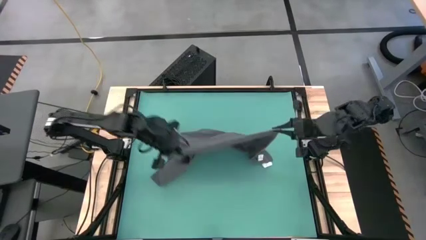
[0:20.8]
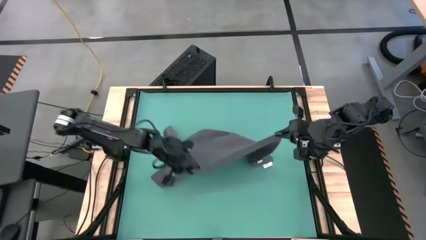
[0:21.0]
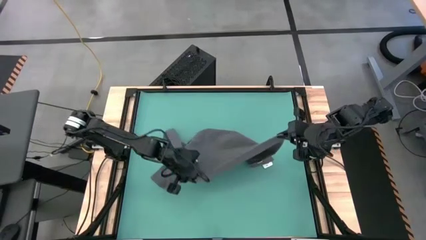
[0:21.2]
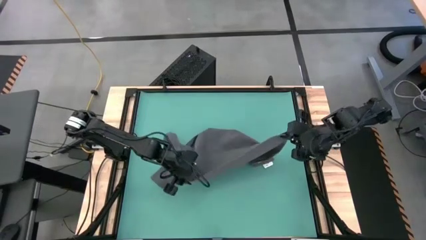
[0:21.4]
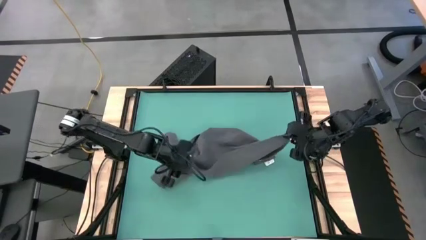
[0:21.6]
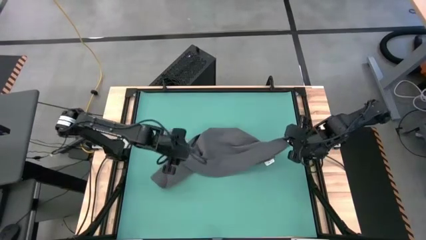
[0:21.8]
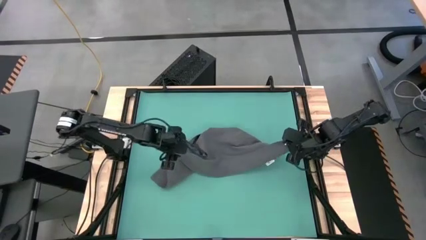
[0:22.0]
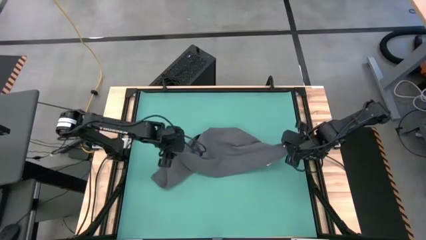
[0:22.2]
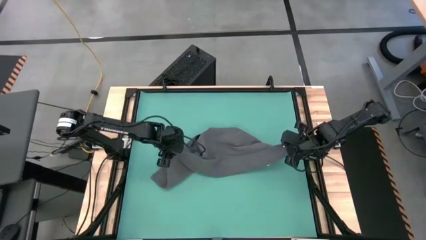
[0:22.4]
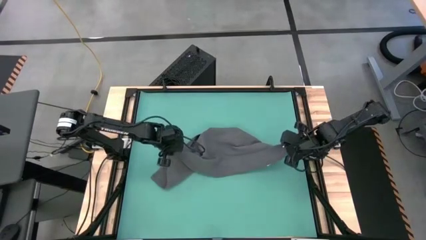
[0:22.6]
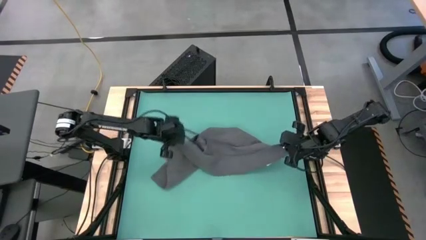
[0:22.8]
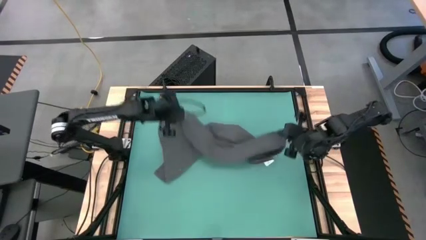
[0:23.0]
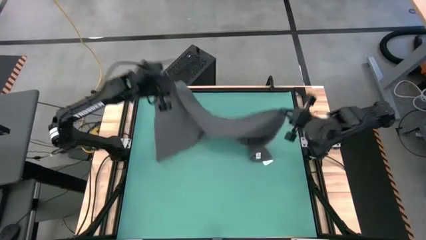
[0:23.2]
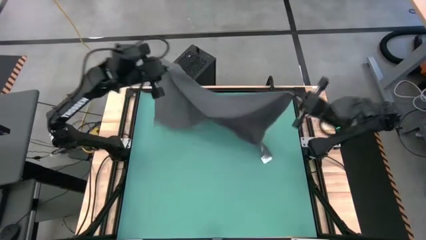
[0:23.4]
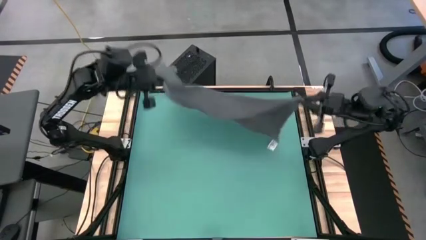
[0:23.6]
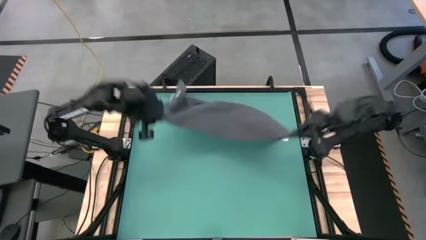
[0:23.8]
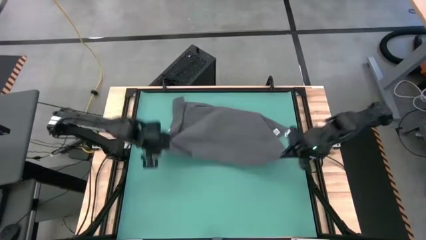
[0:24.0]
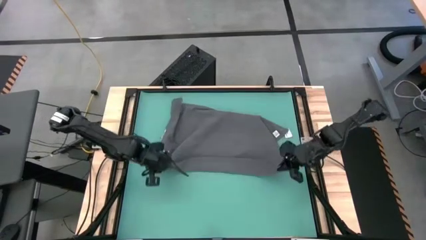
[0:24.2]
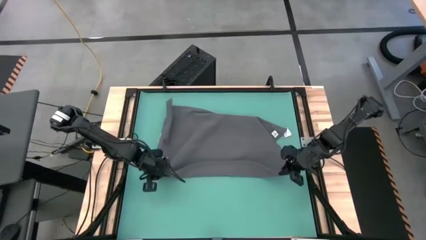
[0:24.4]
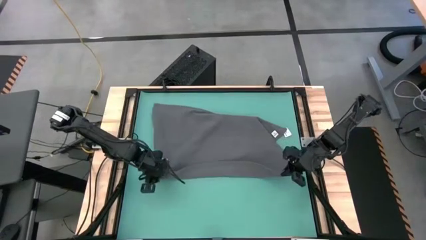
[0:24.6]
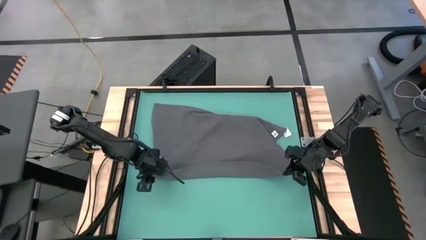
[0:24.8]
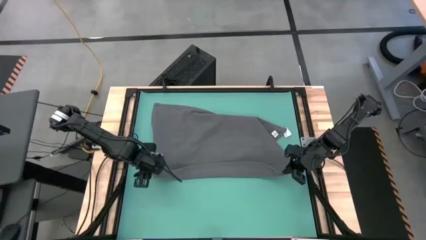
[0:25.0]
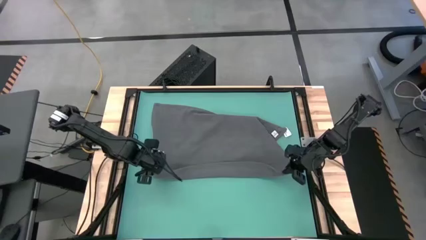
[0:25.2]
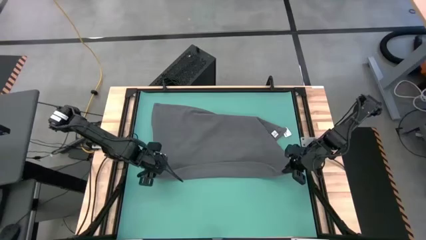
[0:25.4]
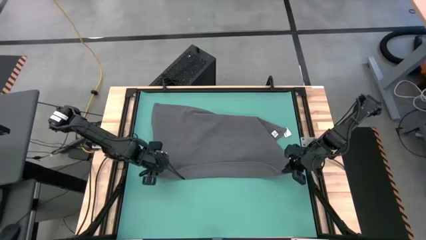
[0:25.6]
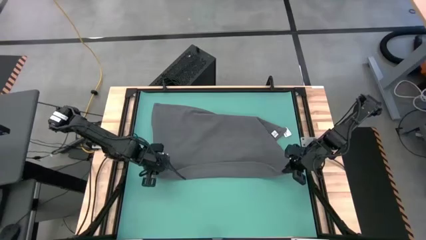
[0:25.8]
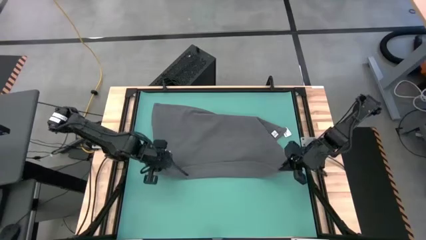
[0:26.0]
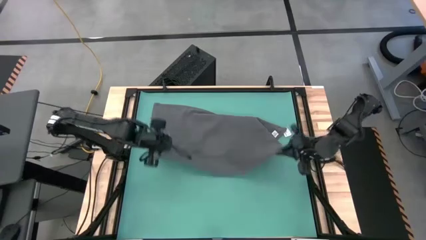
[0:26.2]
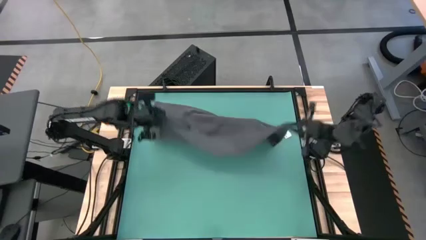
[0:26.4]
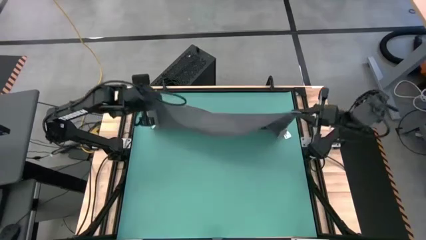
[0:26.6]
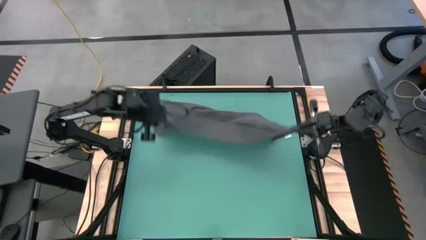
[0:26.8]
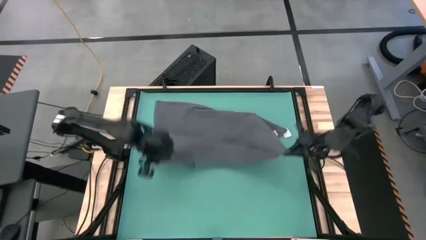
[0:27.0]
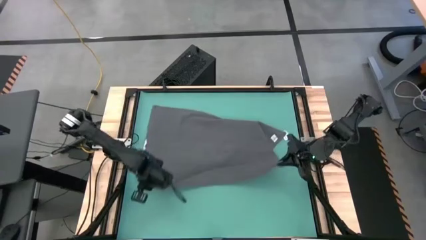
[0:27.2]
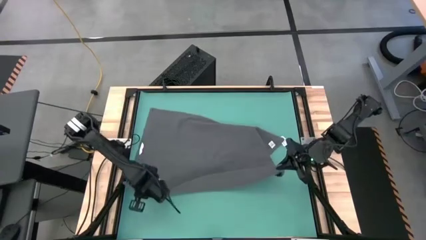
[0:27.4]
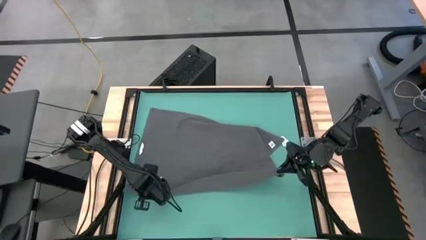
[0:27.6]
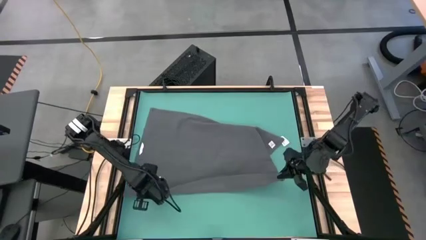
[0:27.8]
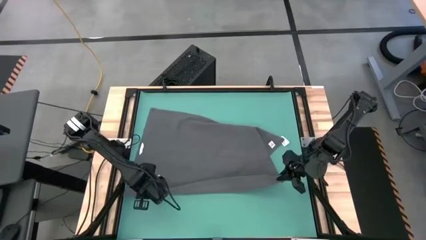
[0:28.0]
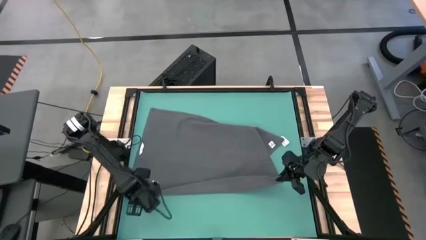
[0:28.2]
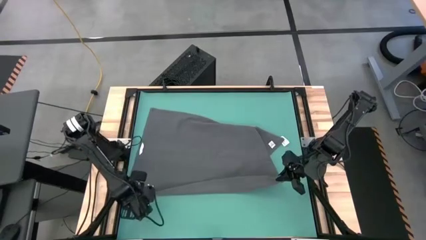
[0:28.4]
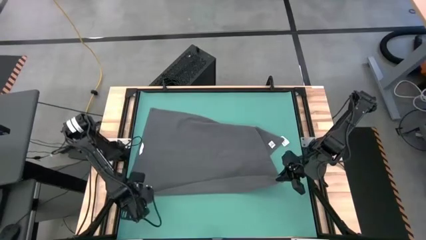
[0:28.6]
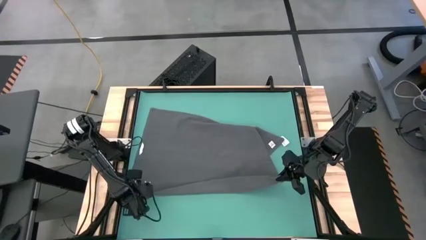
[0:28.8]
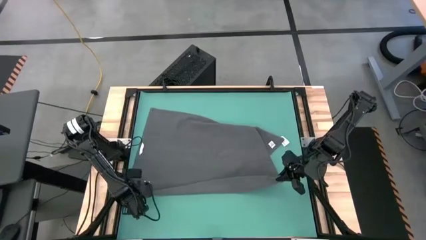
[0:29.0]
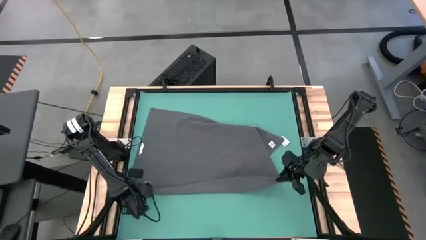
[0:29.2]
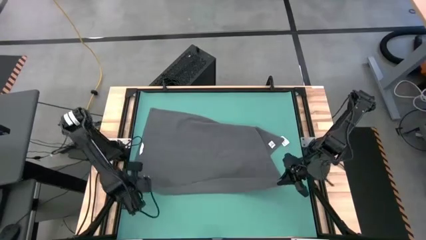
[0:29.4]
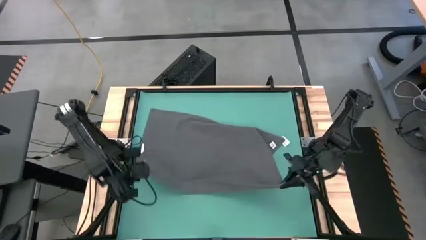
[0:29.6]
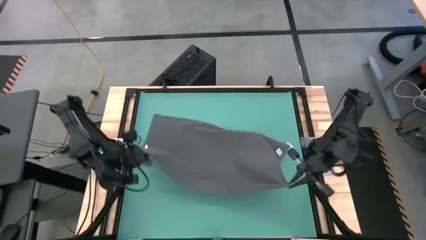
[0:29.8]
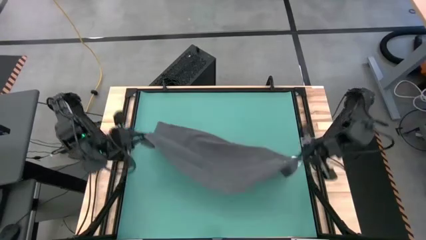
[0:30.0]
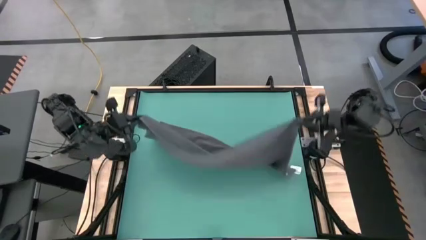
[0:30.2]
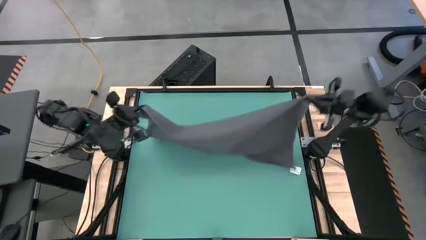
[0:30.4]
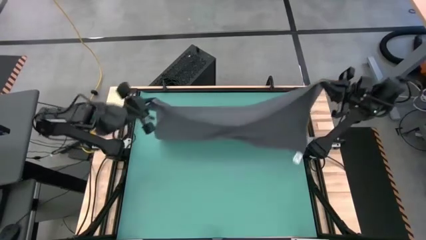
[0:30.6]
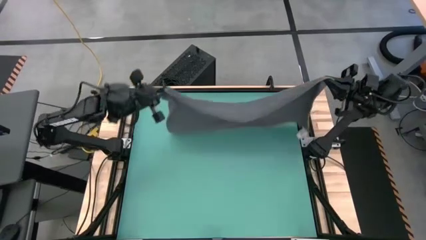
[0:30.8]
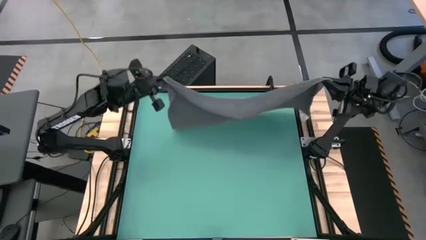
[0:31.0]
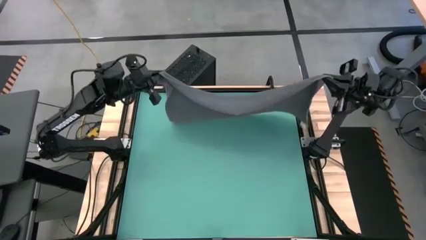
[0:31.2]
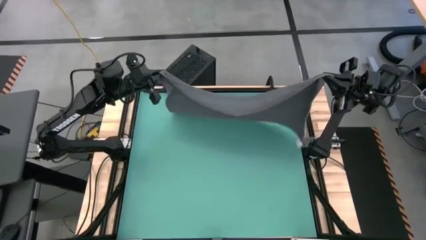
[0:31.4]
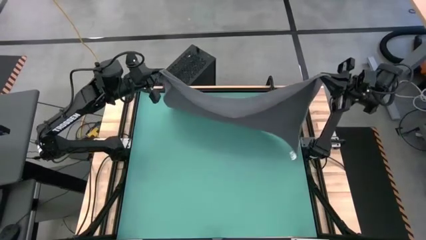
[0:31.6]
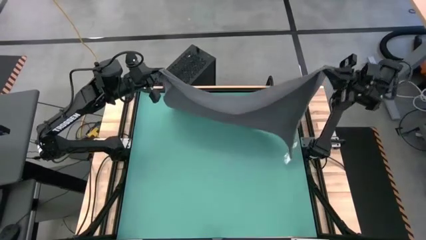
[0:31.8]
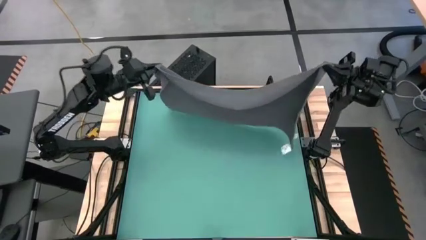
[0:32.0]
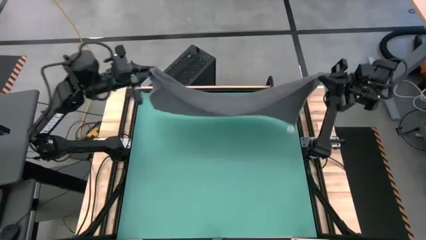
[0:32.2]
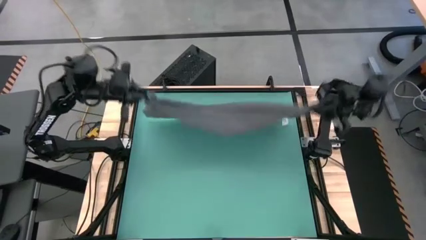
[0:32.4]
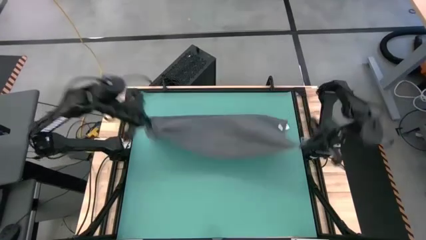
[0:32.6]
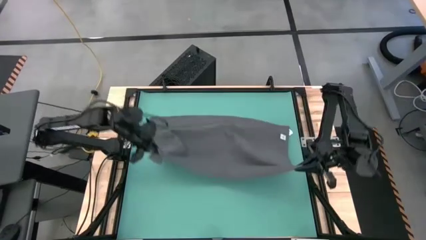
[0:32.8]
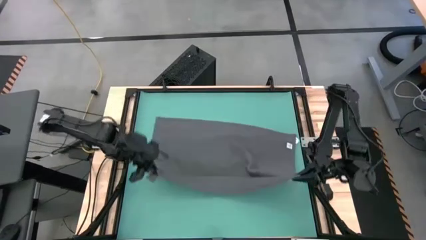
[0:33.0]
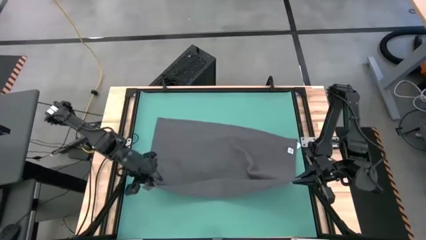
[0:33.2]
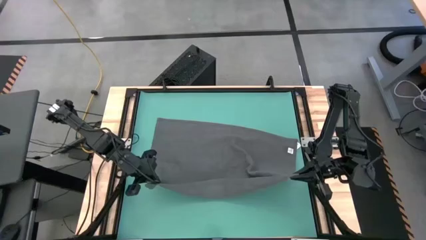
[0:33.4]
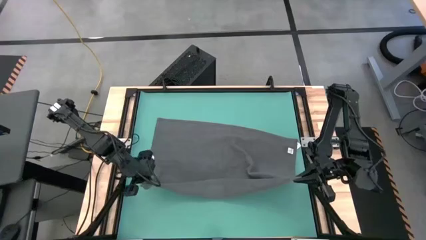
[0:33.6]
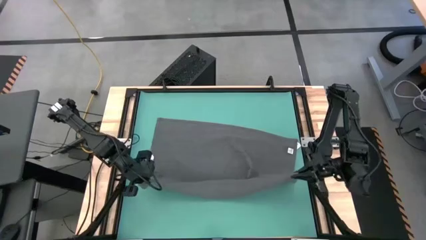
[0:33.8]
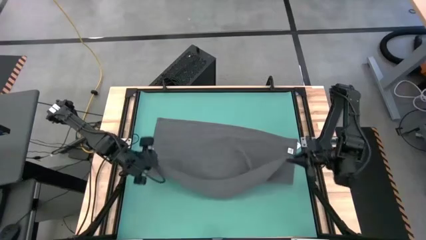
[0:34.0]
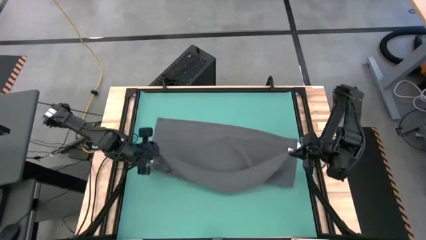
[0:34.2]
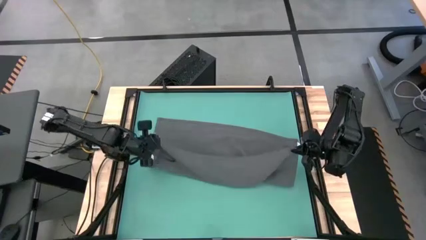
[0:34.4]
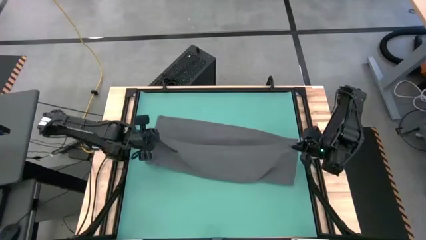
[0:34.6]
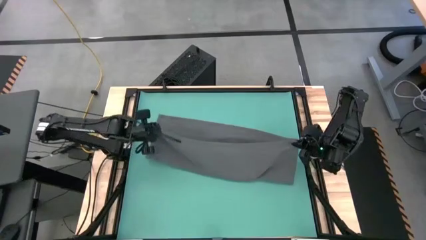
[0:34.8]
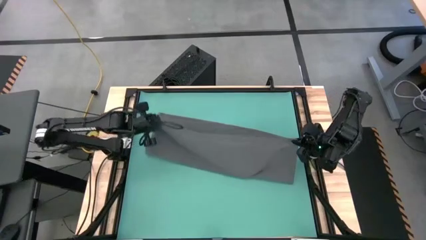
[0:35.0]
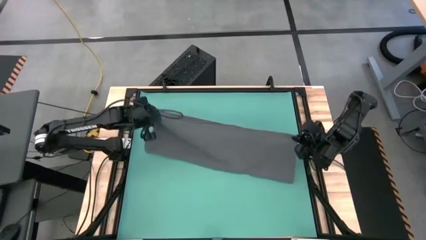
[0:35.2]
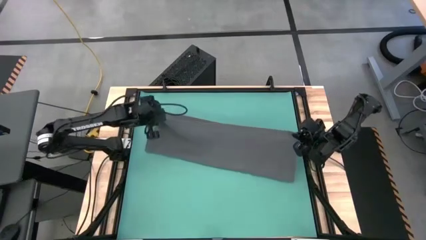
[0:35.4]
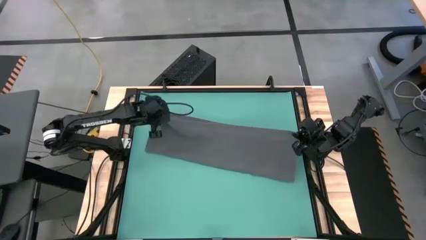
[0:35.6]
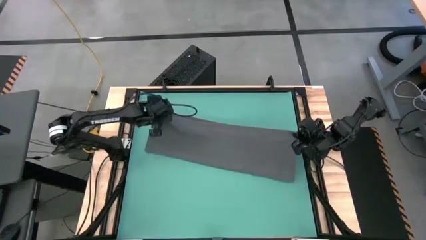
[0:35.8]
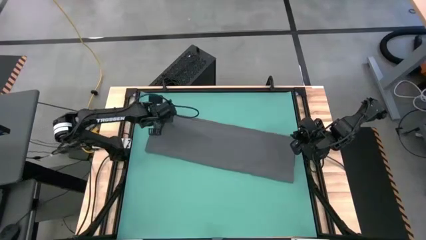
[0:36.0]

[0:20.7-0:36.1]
Task: Roll towel into tight, uniform cylinder
Fold the gray towel
